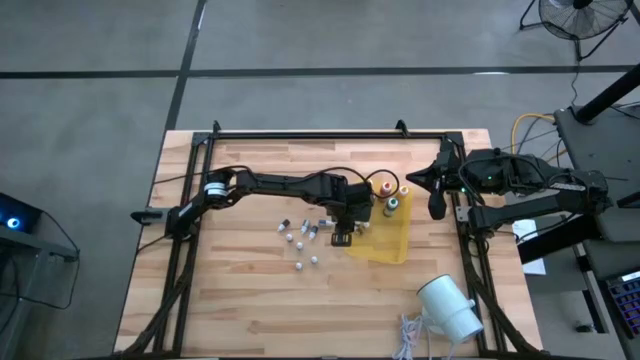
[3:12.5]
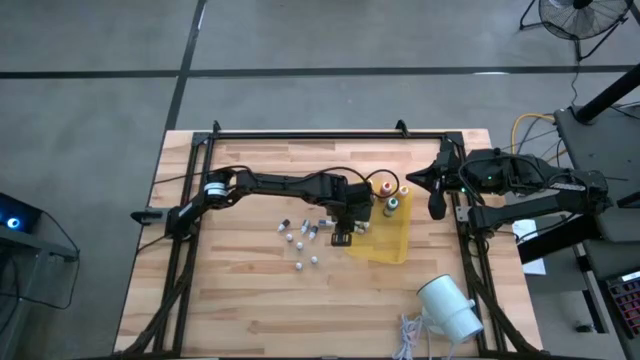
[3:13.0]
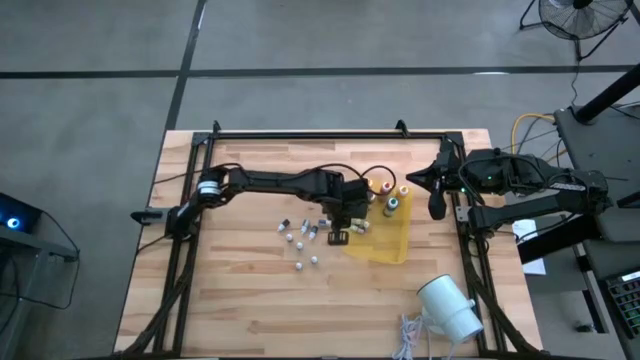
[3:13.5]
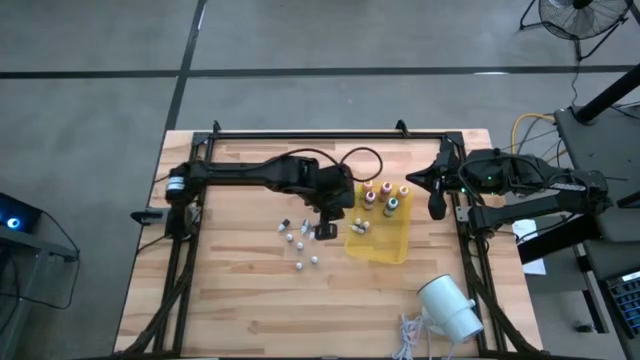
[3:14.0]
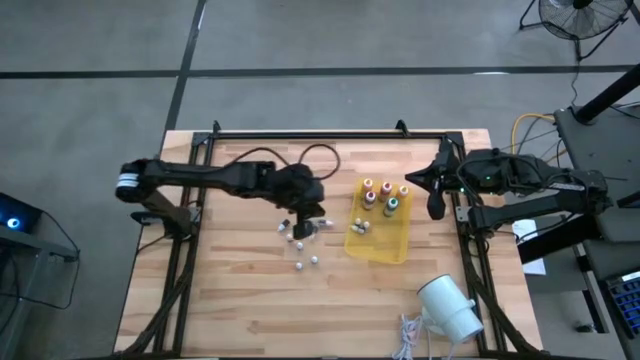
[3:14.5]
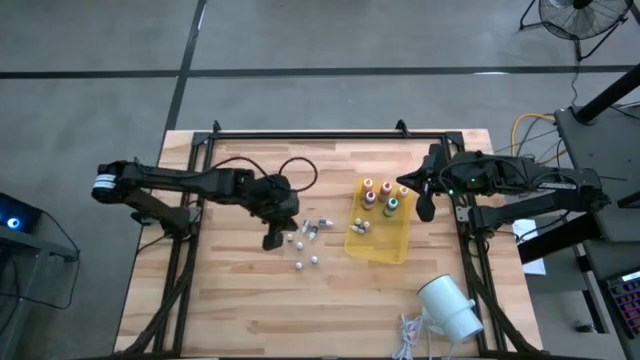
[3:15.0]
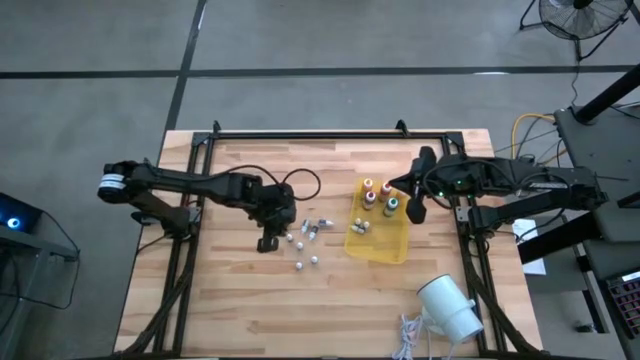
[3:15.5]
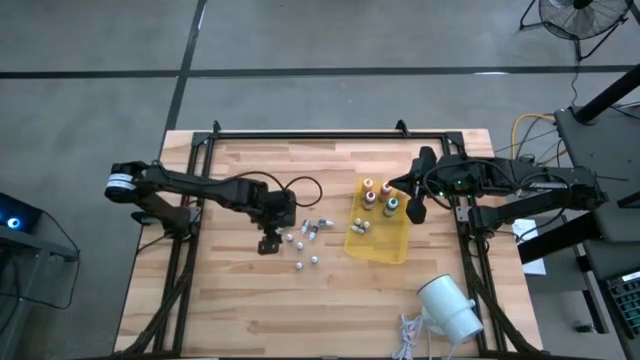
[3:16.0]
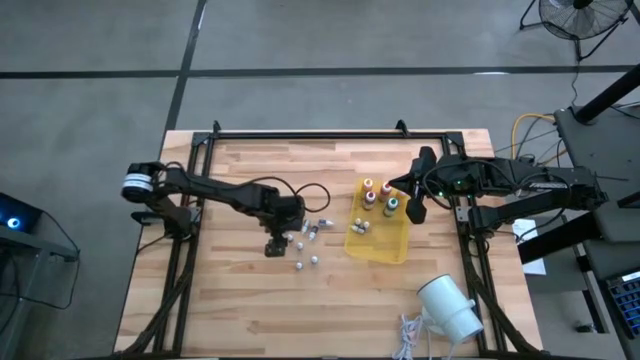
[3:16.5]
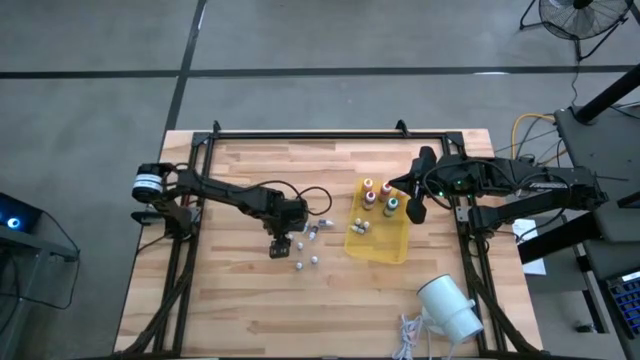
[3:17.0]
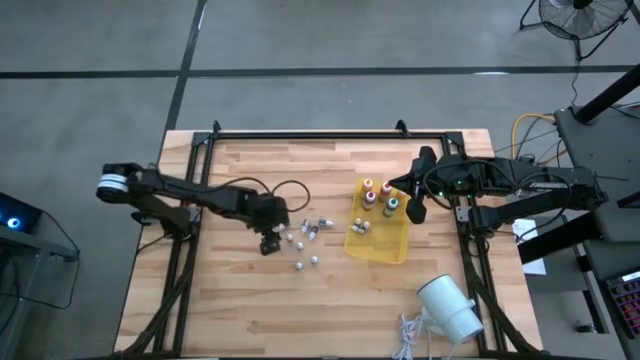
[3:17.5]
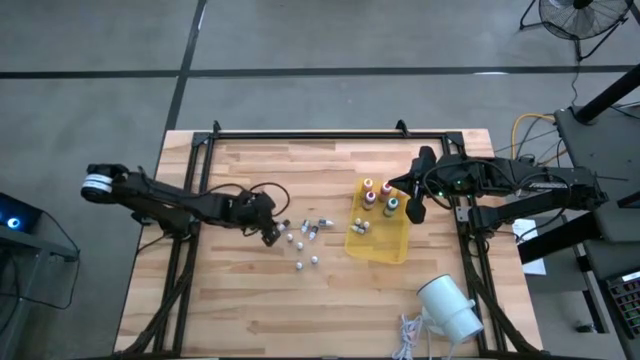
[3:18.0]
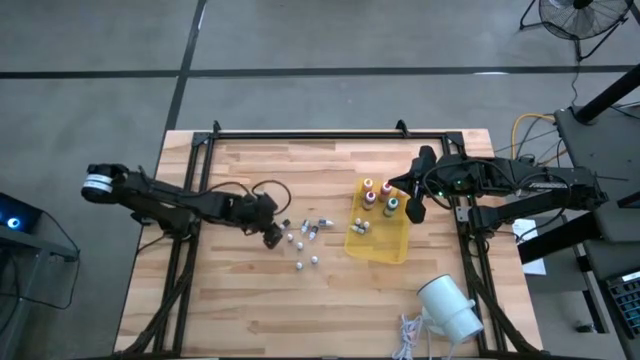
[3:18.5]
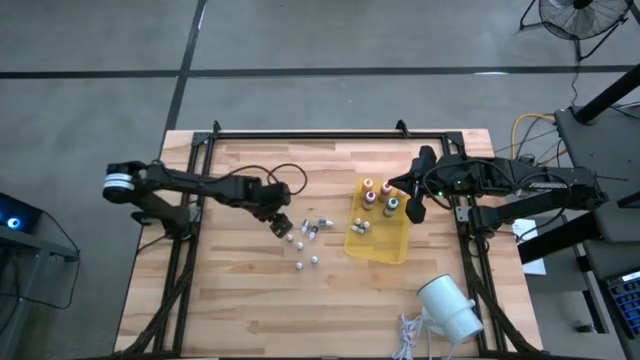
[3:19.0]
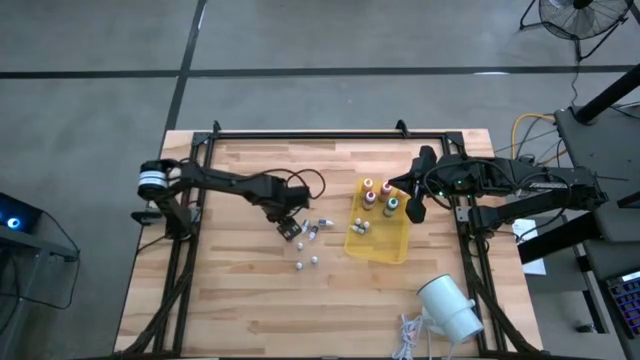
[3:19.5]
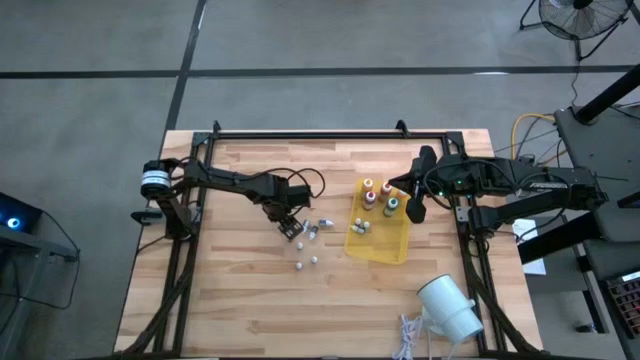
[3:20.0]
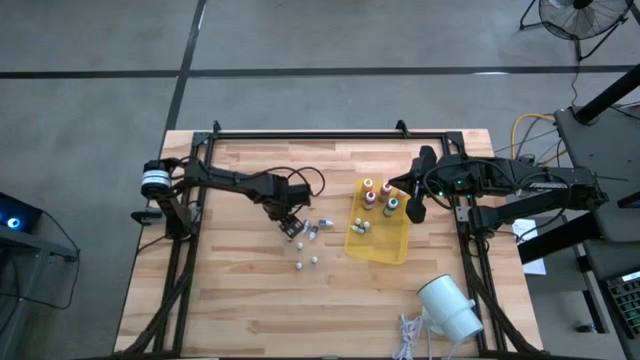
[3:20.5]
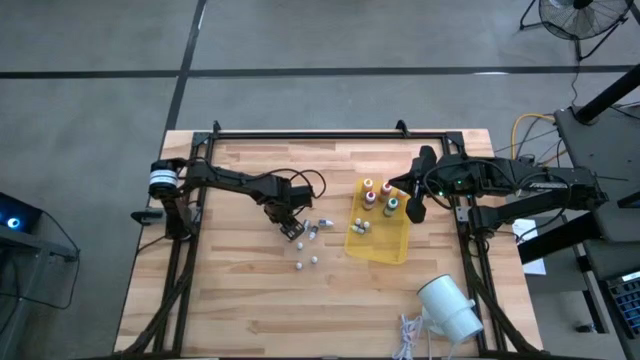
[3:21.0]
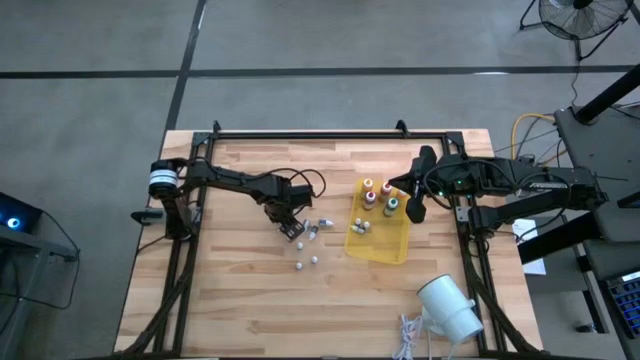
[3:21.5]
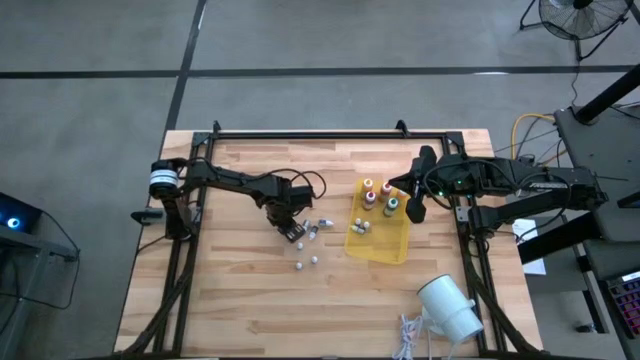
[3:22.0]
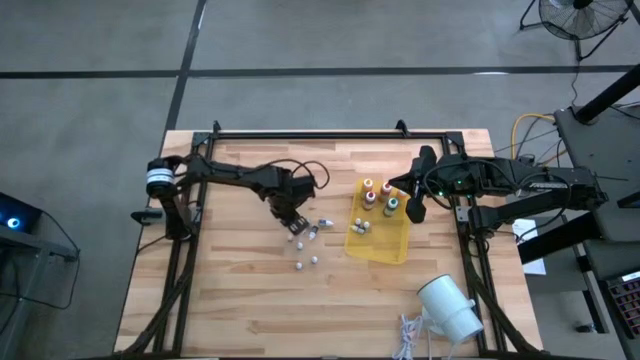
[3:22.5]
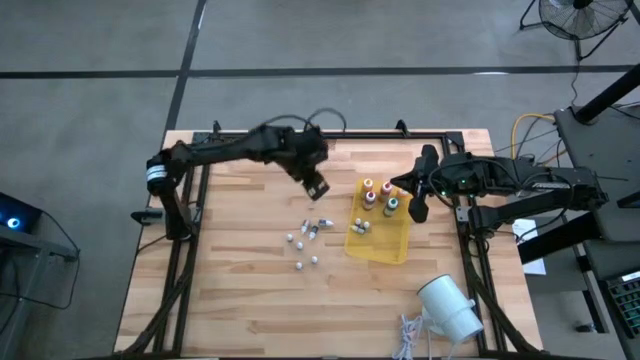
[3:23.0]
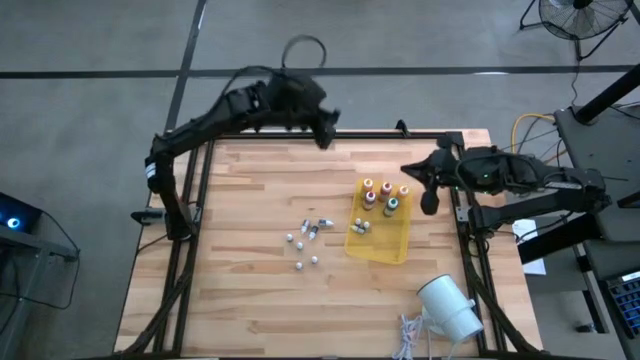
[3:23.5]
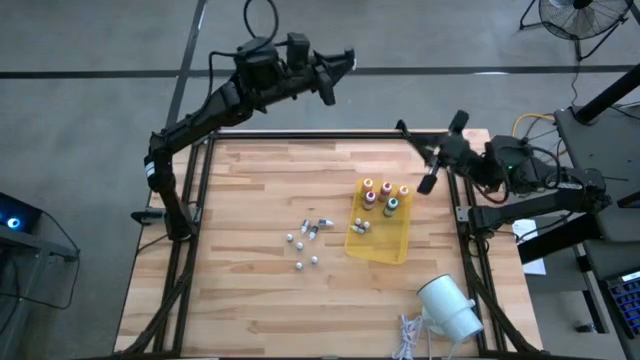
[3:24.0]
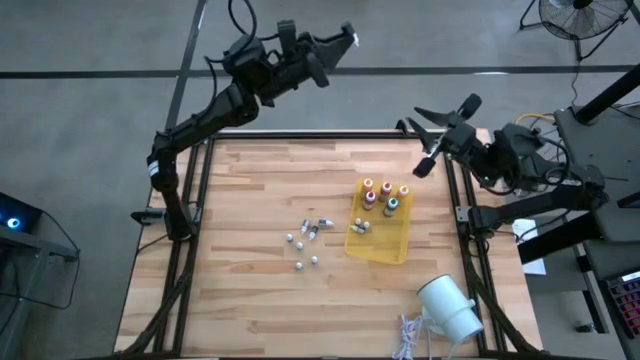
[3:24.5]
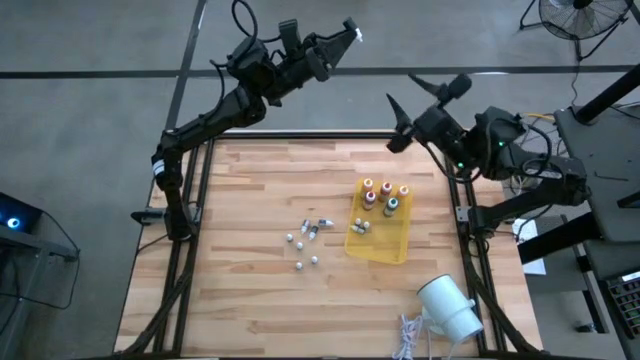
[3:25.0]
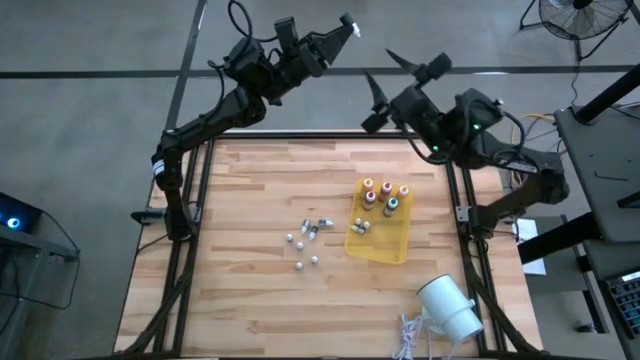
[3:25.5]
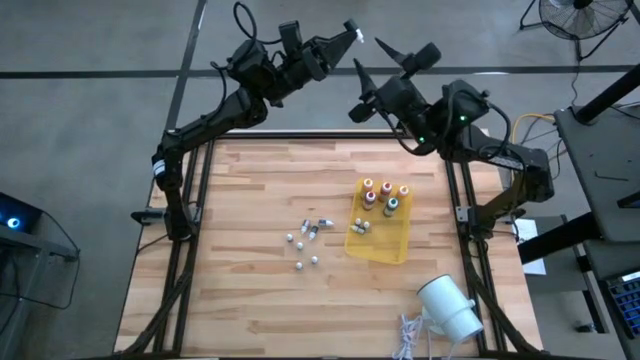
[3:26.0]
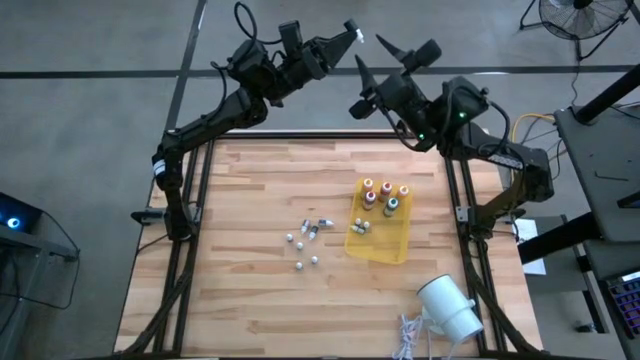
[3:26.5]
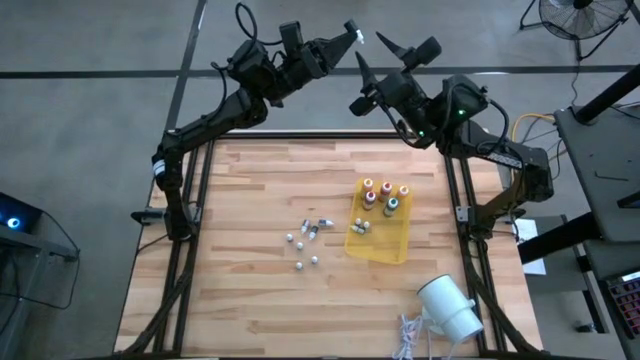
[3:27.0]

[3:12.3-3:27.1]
Task: Pick & Place food coloring
Put the top small black food coloring bottle into the yellow bin

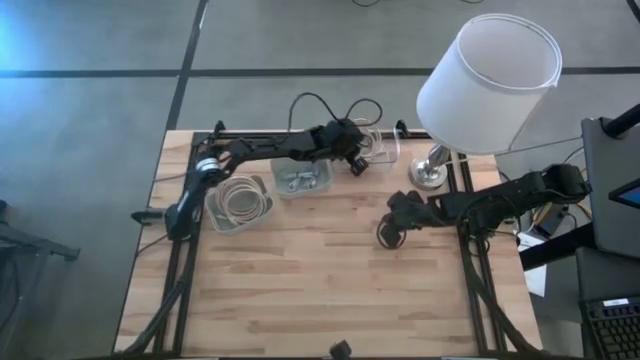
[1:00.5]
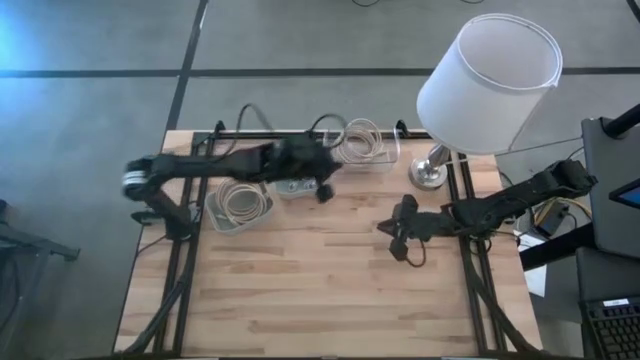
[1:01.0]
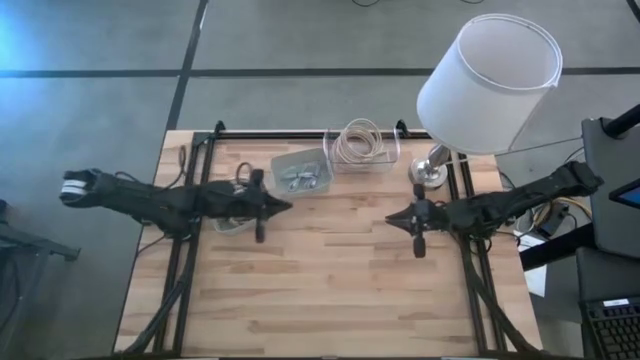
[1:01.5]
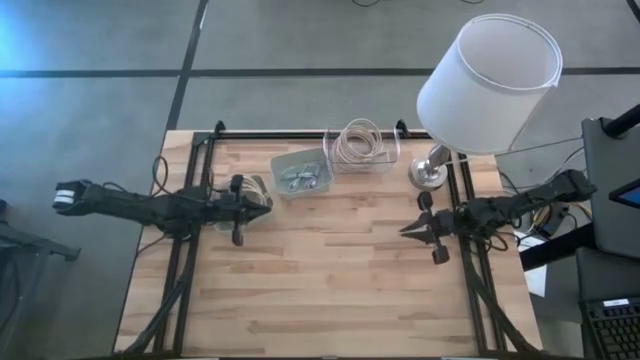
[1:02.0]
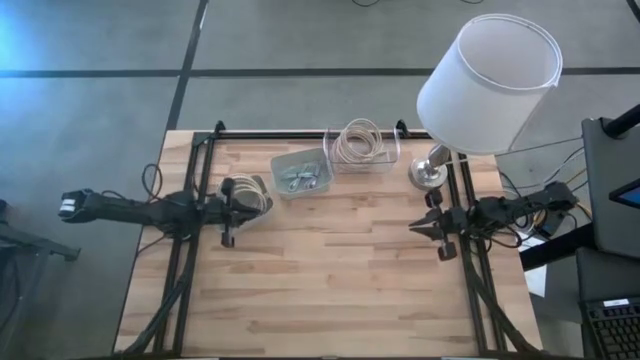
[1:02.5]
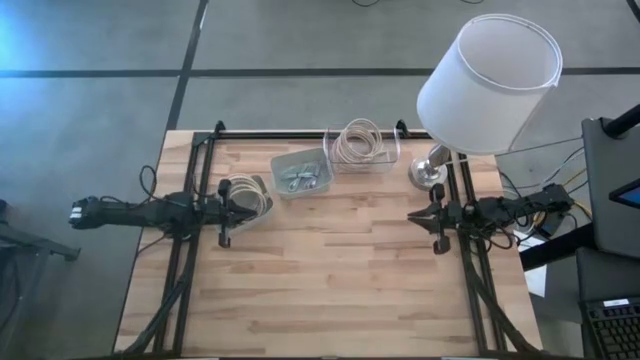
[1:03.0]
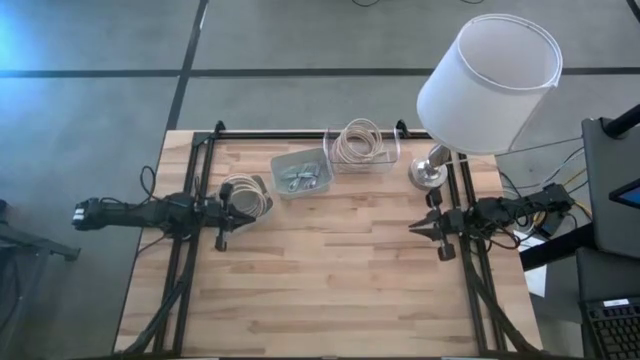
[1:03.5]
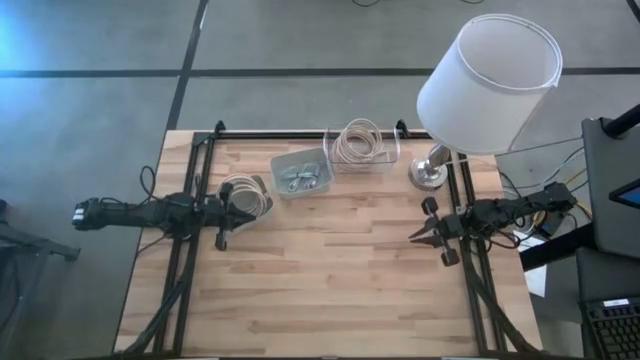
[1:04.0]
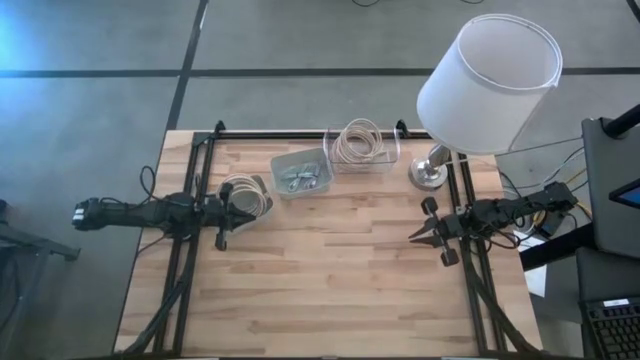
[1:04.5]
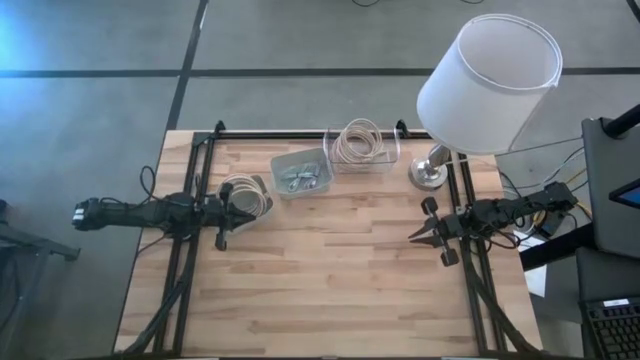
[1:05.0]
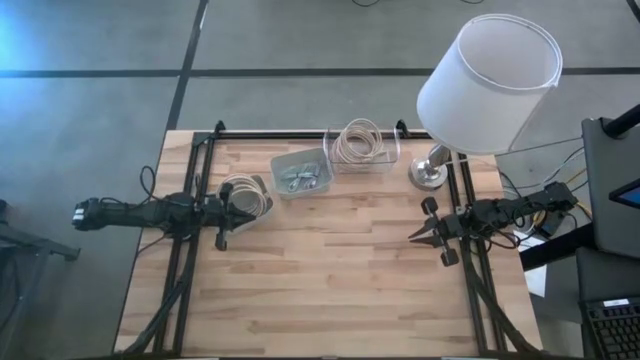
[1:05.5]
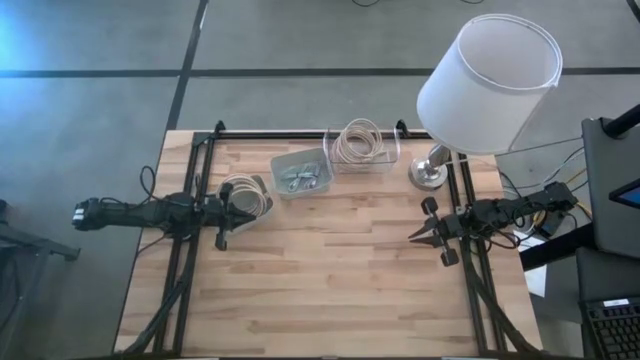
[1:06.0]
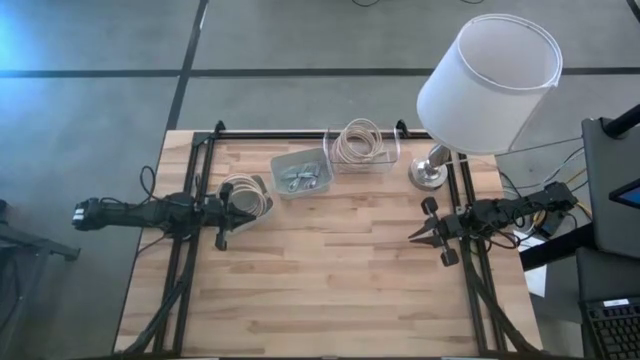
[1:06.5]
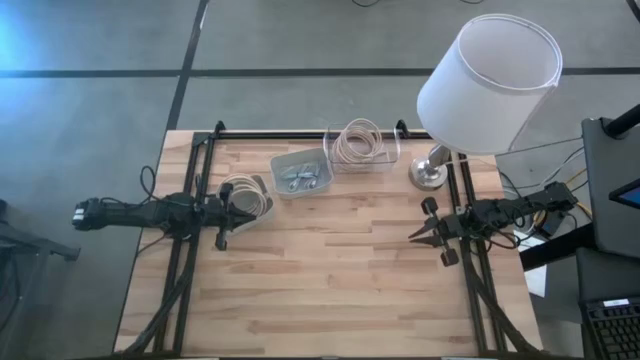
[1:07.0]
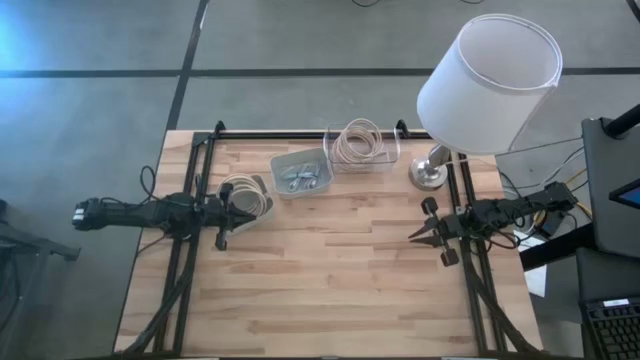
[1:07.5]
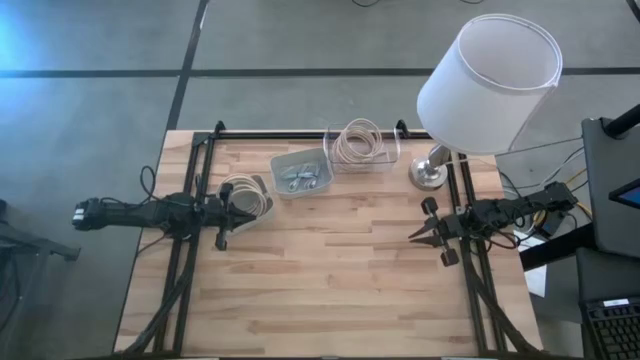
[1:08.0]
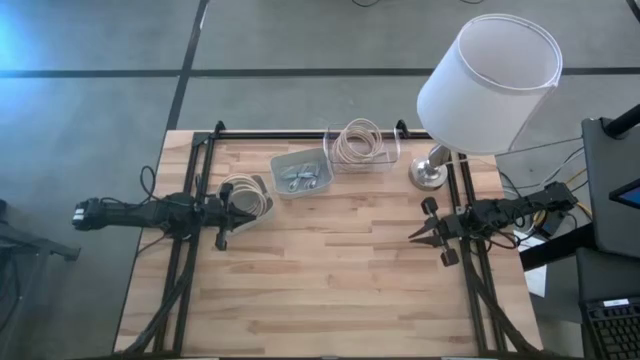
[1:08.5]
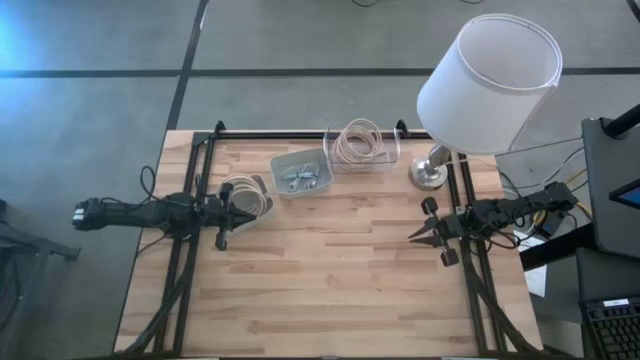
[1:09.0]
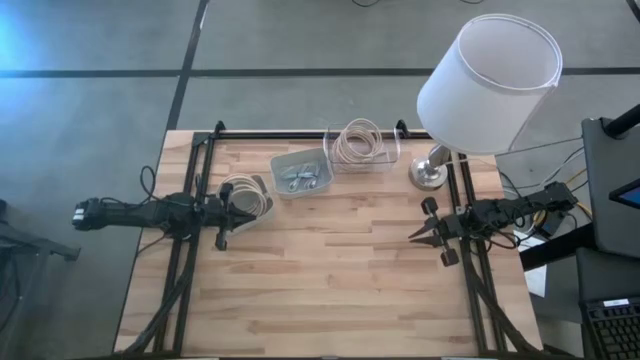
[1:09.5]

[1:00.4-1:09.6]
Task: Pick & Place USB Port
Return to Home Position
